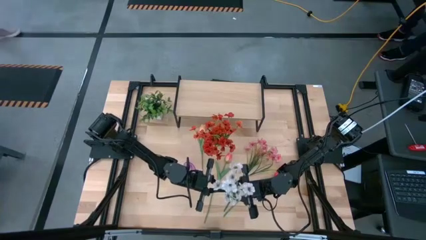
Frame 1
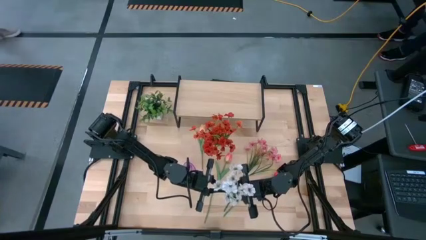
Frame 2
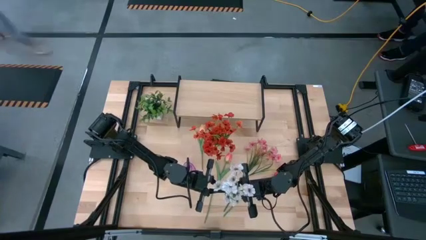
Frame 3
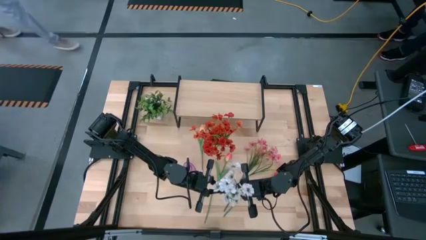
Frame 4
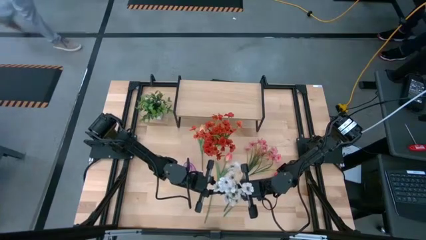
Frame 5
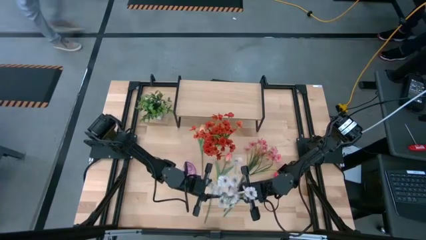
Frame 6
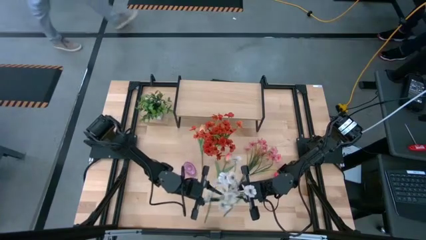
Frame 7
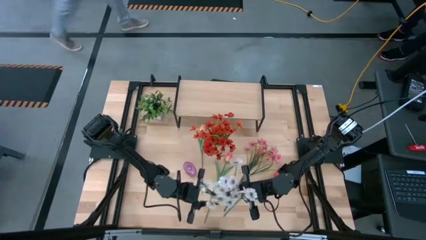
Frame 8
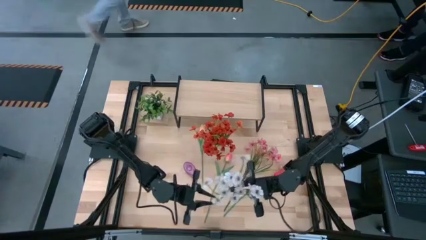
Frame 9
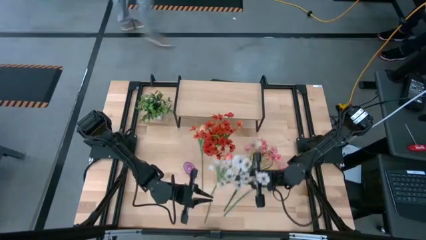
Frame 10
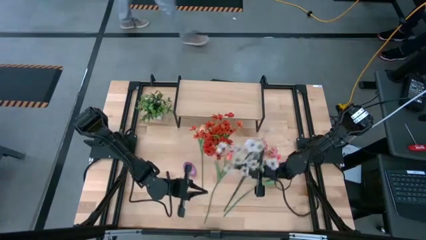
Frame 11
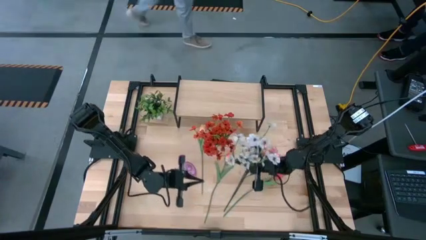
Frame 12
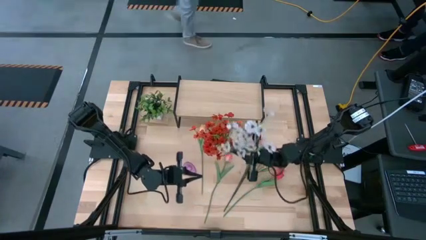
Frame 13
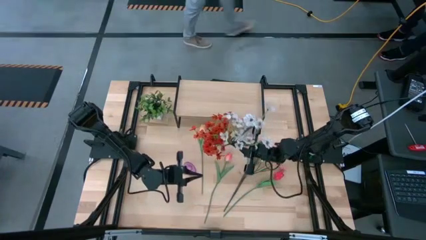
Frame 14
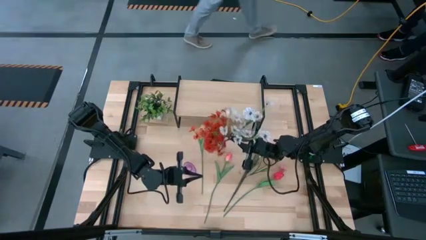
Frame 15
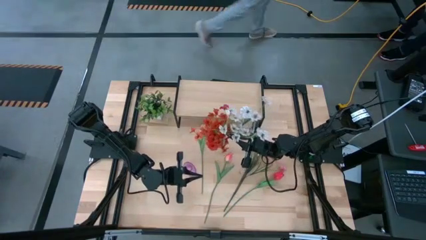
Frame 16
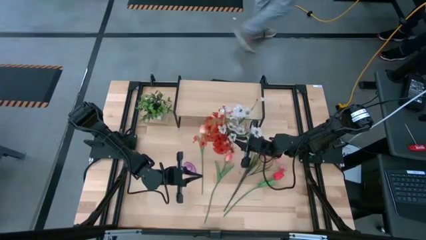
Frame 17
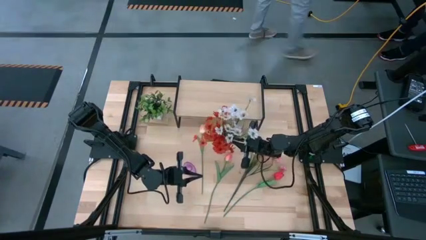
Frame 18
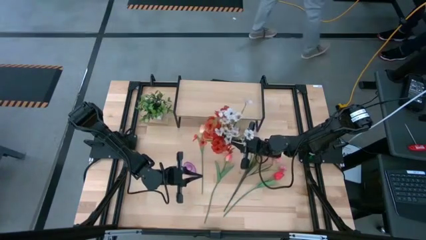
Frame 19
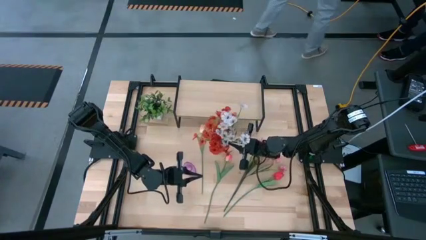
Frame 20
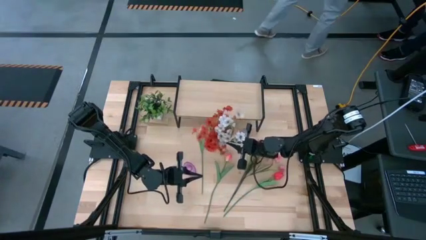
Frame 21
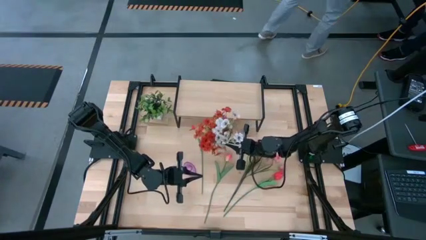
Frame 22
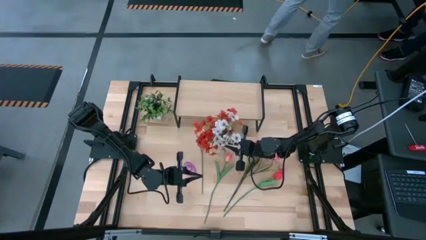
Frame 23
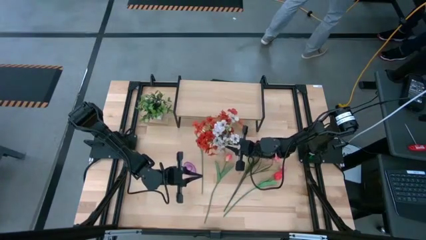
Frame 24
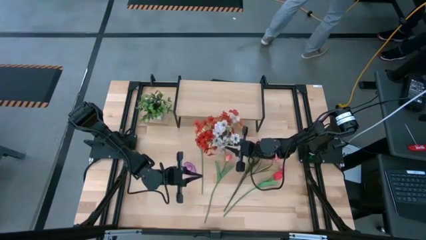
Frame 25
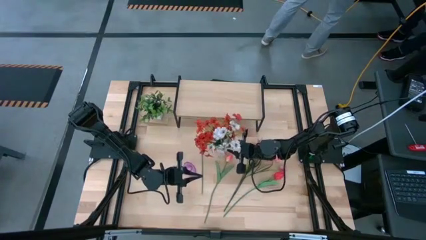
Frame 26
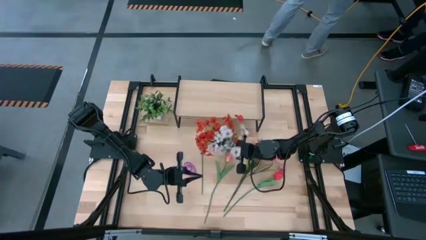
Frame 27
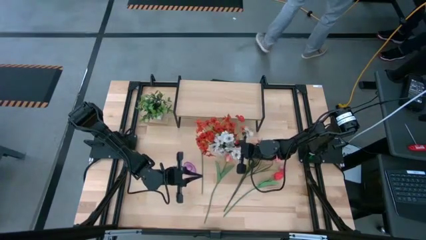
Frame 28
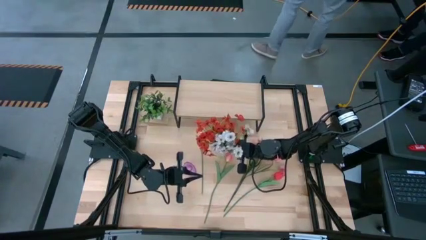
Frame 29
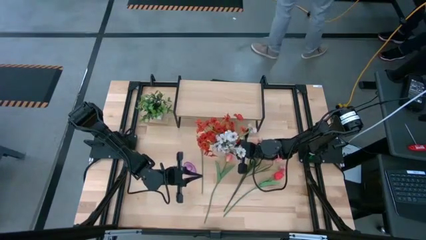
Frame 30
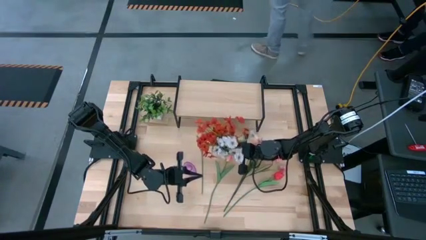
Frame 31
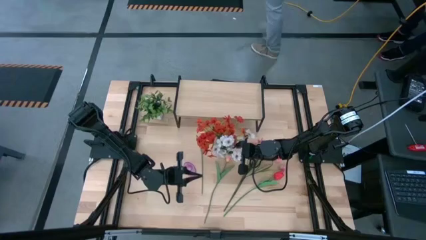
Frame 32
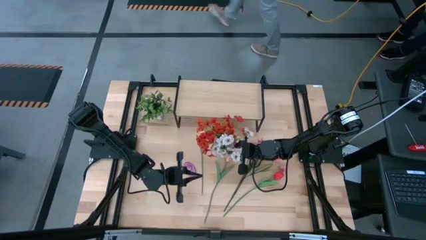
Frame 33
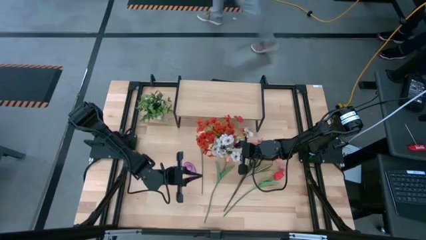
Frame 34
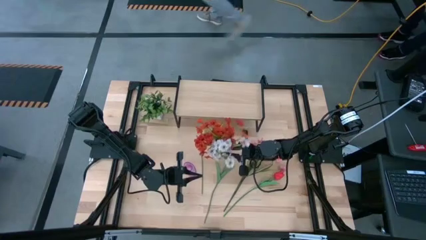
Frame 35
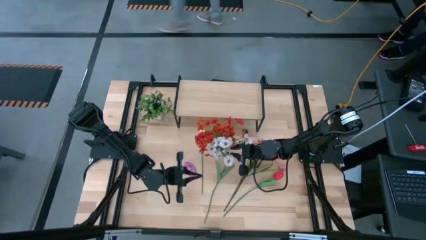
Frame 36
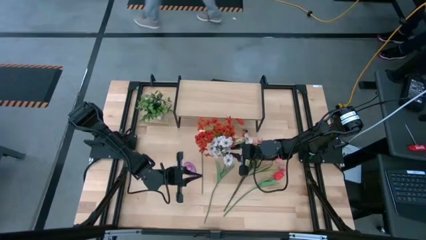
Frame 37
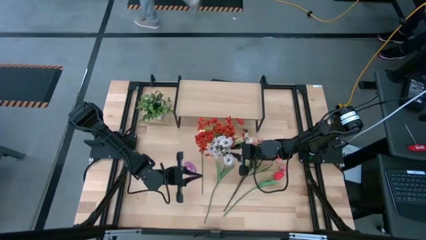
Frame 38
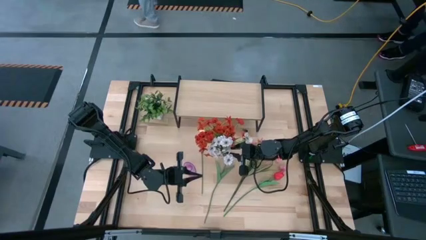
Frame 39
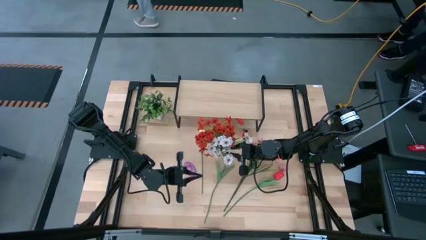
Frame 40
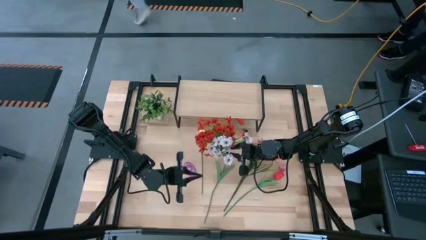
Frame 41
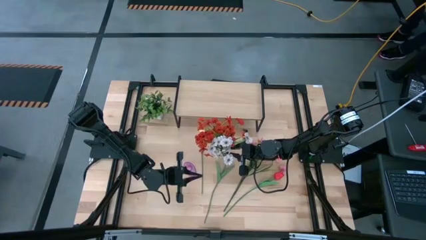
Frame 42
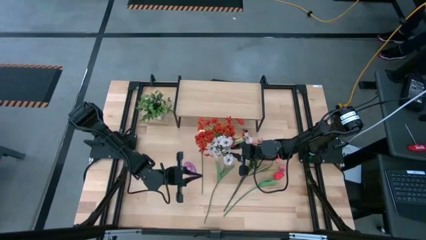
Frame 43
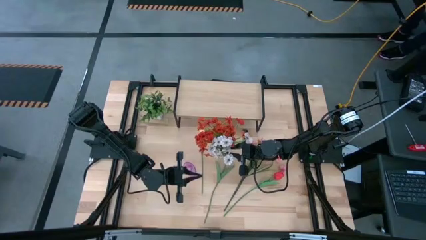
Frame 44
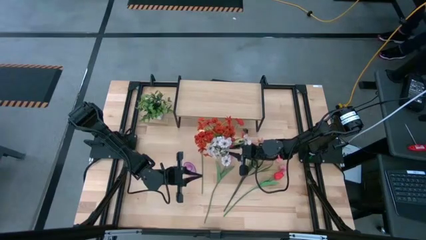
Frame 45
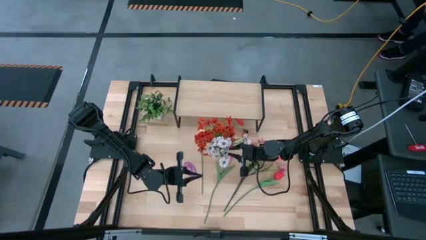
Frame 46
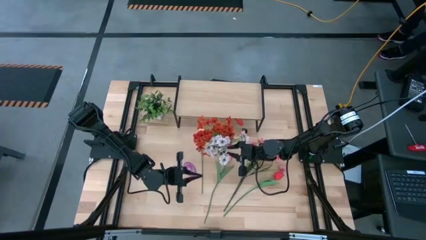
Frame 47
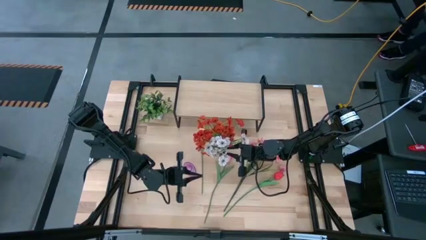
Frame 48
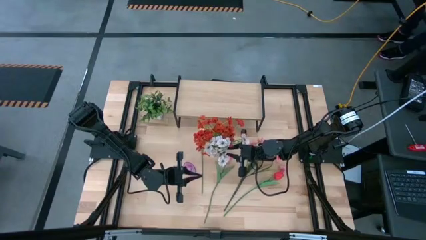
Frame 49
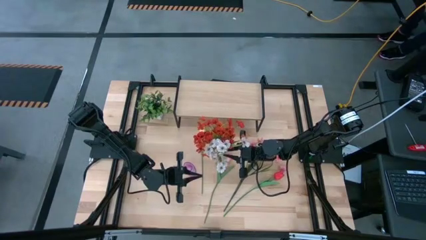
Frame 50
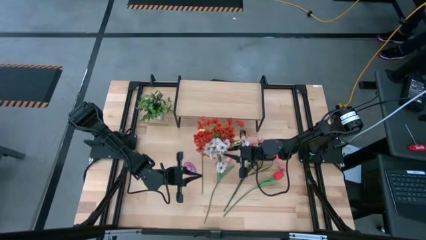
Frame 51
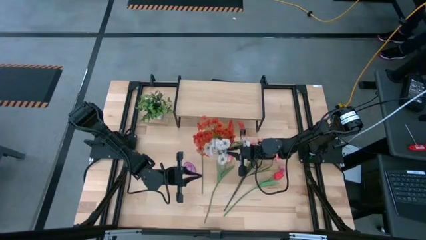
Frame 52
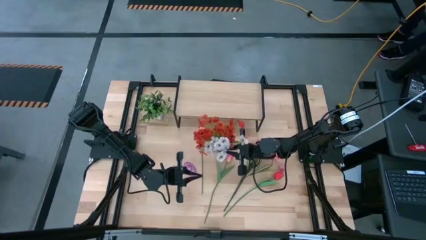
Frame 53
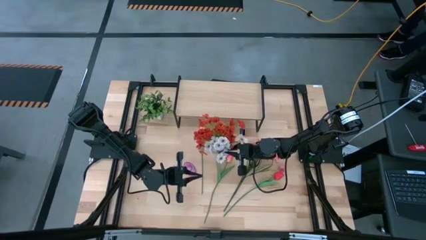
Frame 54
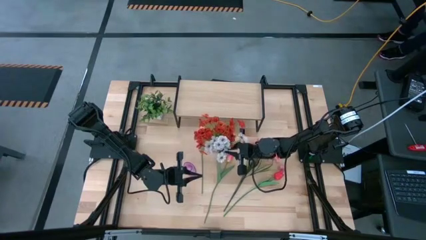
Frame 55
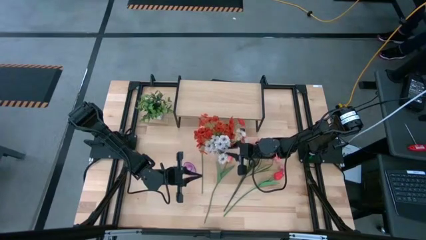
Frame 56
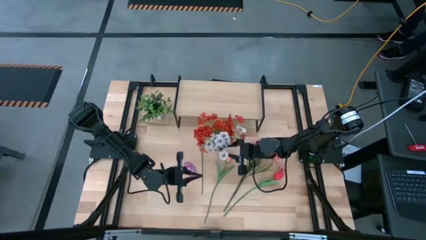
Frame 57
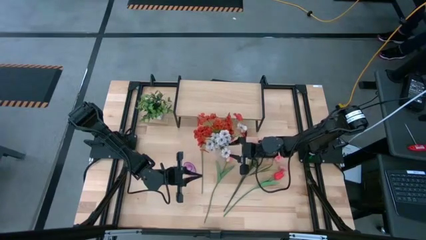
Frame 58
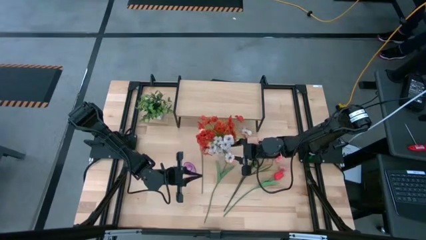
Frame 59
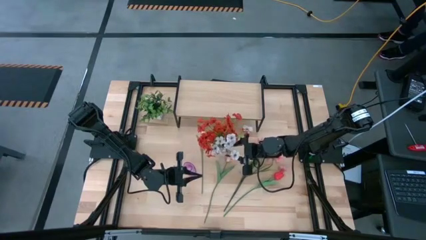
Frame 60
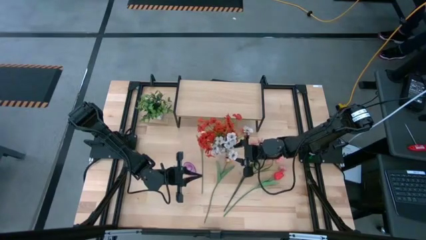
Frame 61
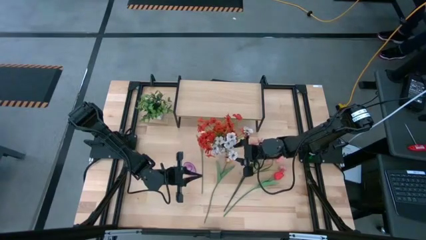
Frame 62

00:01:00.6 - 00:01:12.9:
Task: Pick and place flowers into a vace then onto a shelf
Put the white flowers into the transparent vase

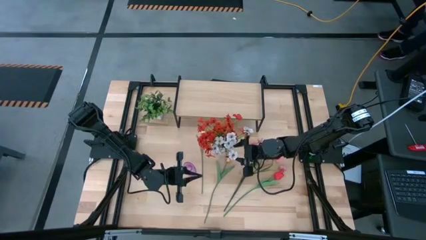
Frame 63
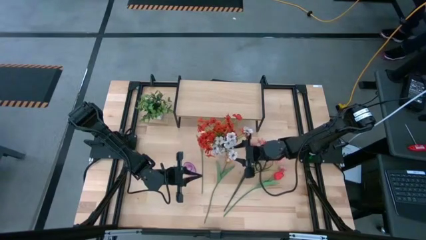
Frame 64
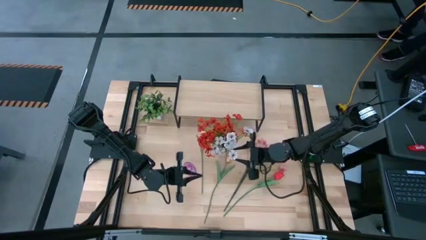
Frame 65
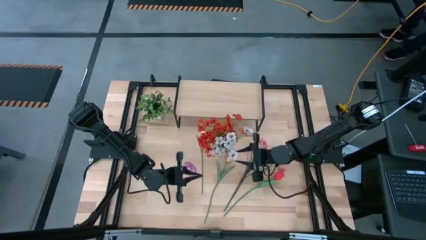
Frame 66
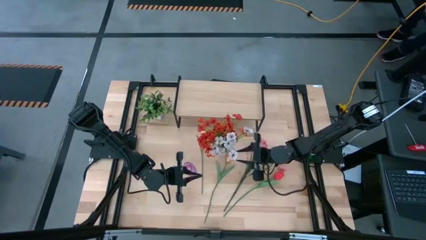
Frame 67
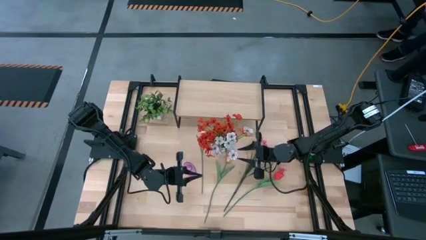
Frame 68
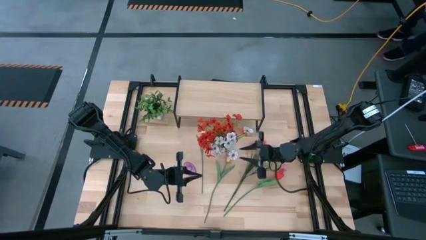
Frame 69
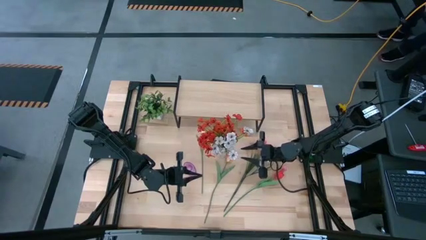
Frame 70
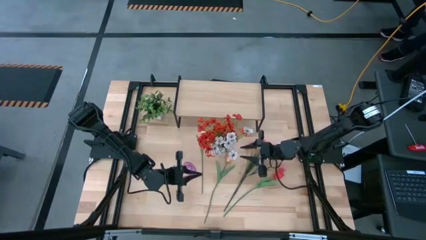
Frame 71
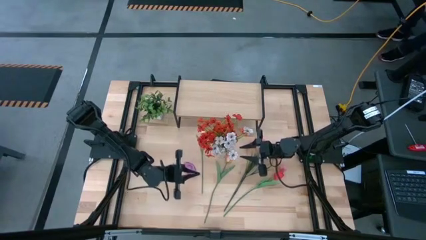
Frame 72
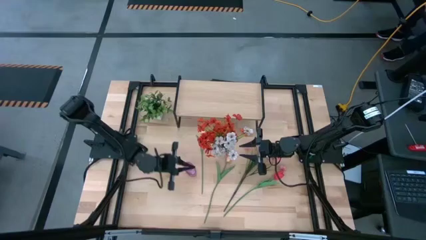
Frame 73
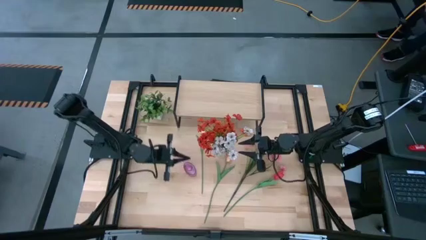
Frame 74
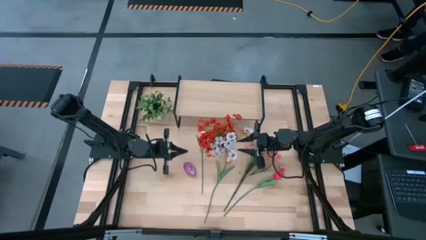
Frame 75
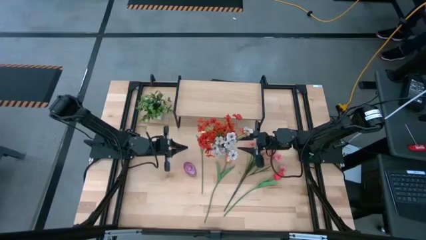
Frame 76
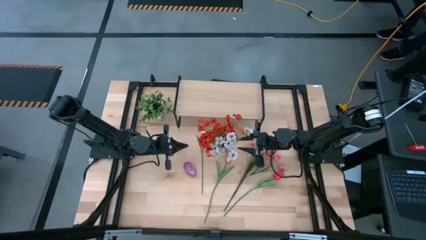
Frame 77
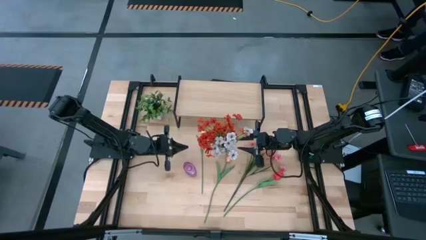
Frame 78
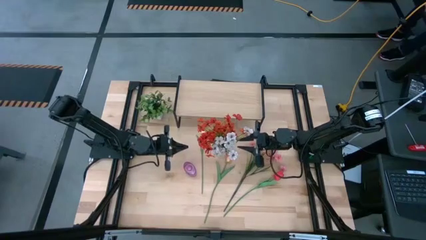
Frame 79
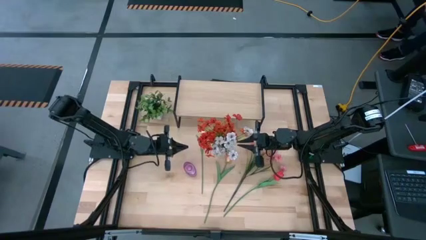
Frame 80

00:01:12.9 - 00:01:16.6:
Put the transparent vase with flowers on the shelf

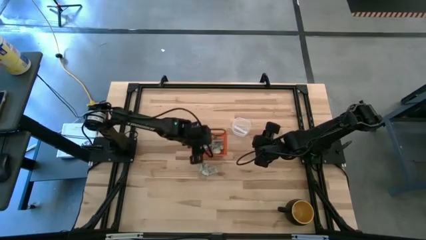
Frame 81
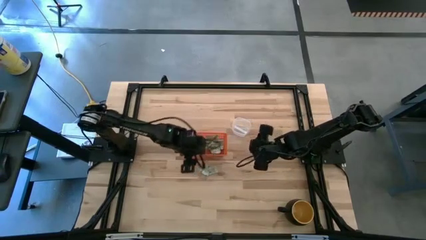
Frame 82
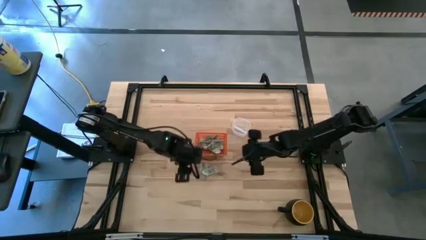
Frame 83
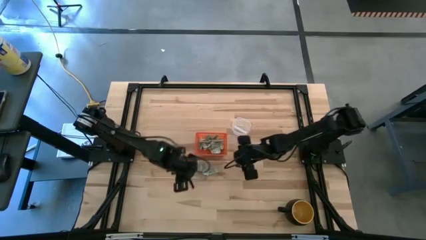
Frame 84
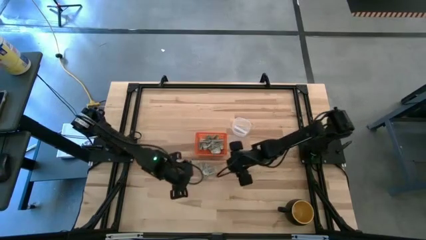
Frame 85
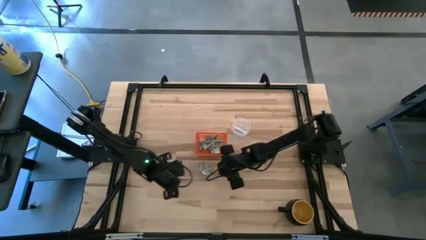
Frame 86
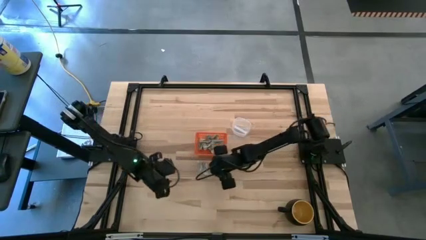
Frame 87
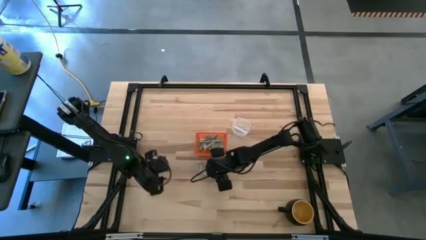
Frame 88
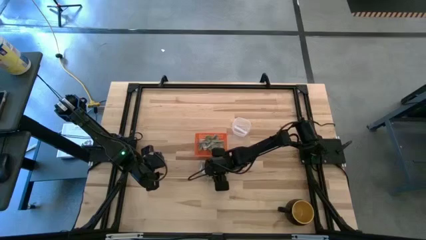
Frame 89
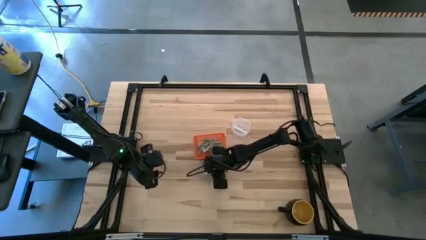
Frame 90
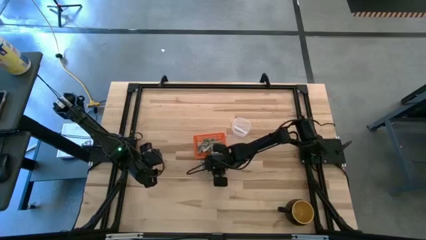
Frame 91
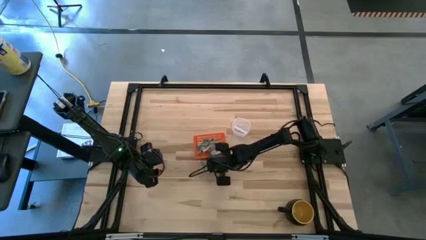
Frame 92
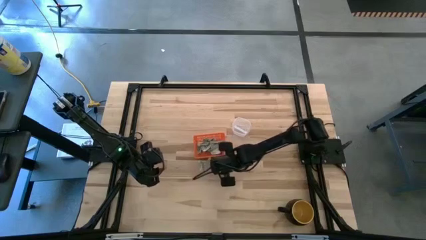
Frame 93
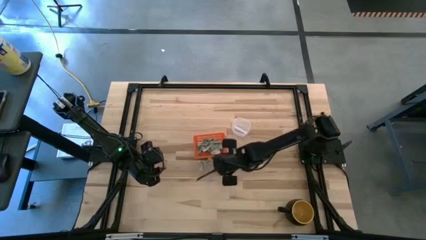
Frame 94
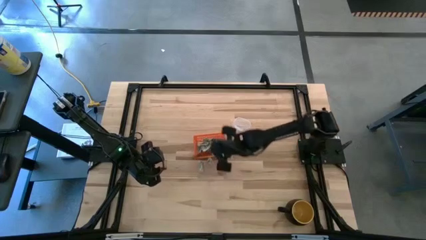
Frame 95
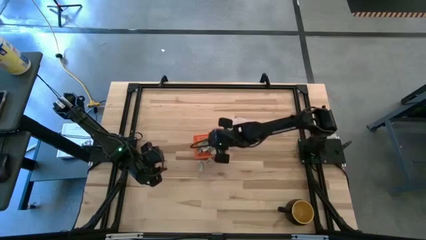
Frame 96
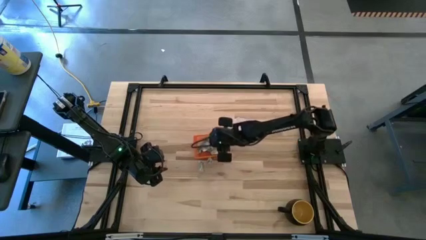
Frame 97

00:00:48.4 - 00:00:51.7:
Task: Pick and place Stevia / Truvia into bins
Put the right stevia packet into the basket
